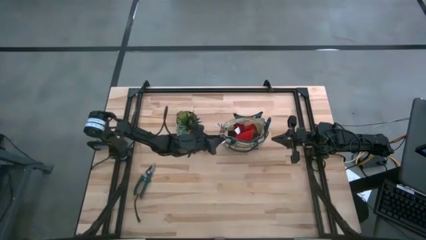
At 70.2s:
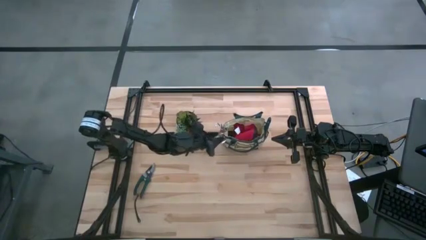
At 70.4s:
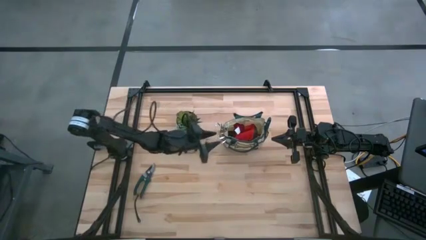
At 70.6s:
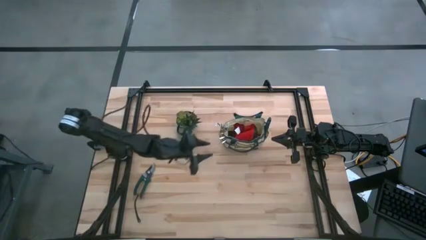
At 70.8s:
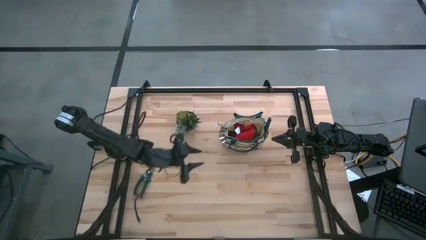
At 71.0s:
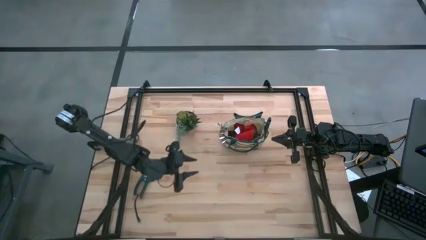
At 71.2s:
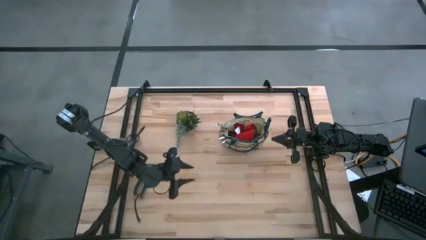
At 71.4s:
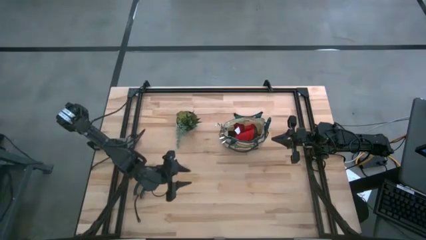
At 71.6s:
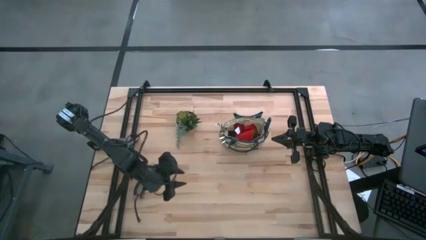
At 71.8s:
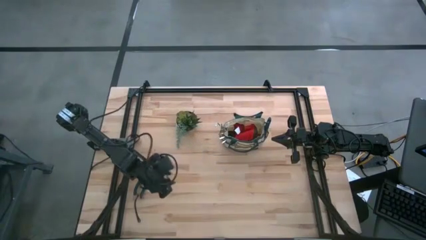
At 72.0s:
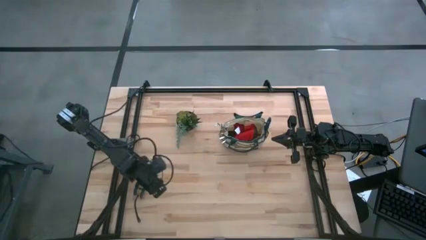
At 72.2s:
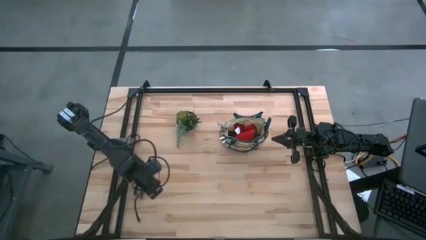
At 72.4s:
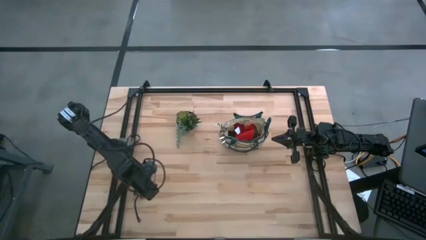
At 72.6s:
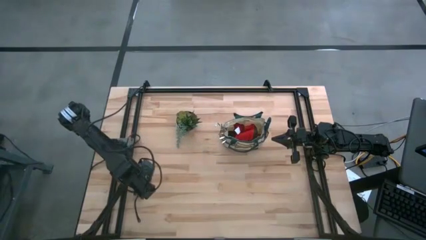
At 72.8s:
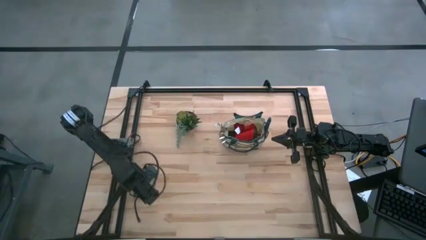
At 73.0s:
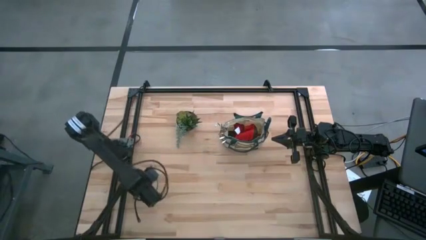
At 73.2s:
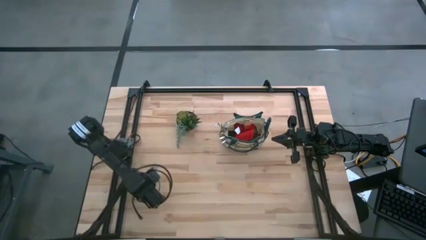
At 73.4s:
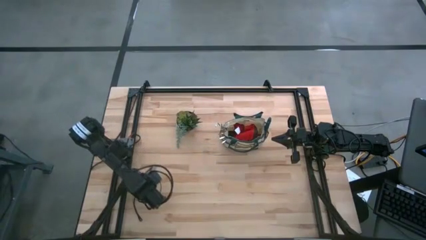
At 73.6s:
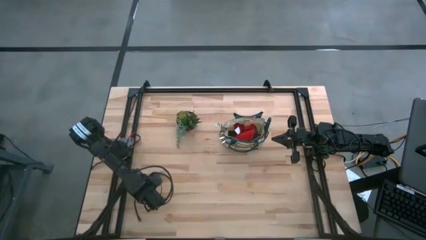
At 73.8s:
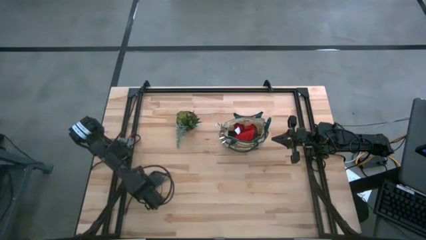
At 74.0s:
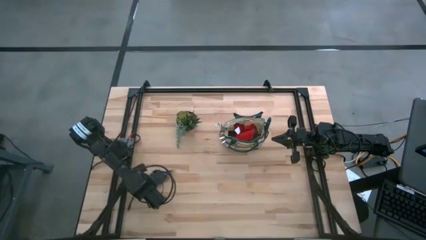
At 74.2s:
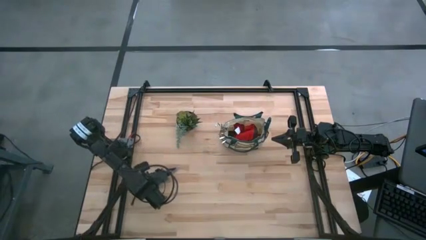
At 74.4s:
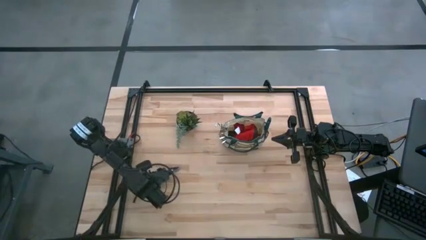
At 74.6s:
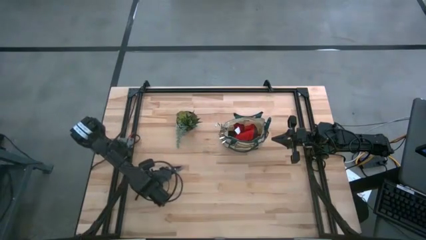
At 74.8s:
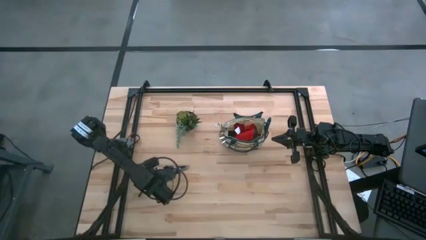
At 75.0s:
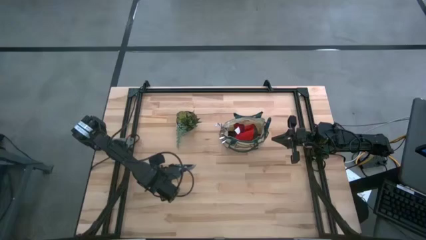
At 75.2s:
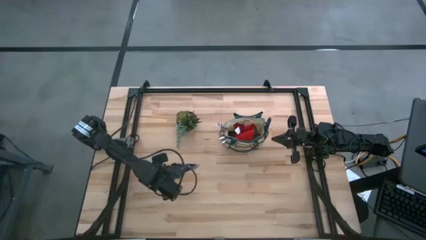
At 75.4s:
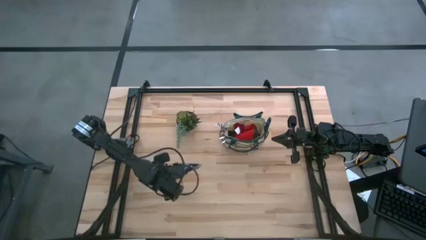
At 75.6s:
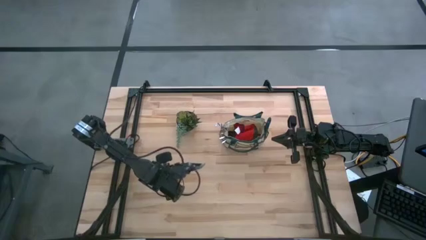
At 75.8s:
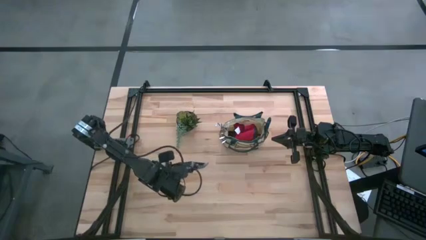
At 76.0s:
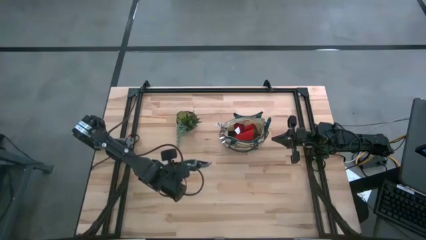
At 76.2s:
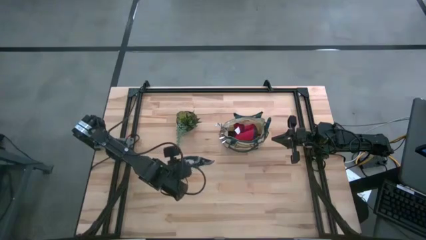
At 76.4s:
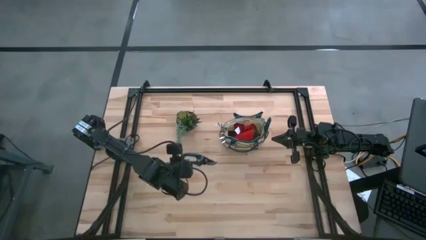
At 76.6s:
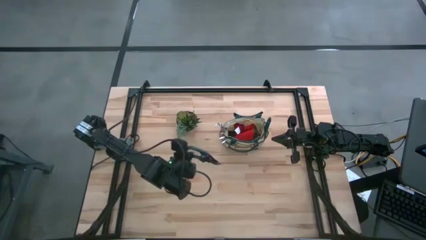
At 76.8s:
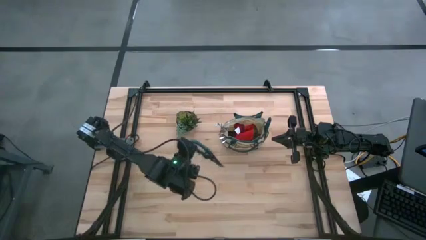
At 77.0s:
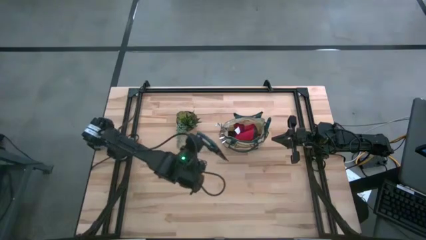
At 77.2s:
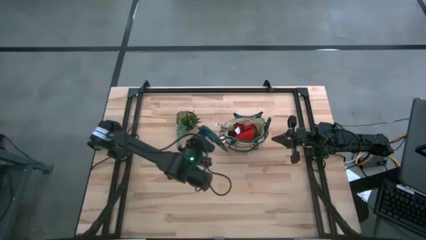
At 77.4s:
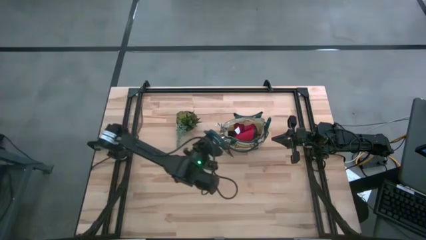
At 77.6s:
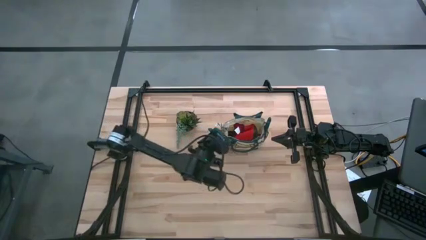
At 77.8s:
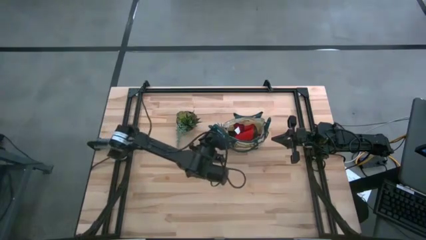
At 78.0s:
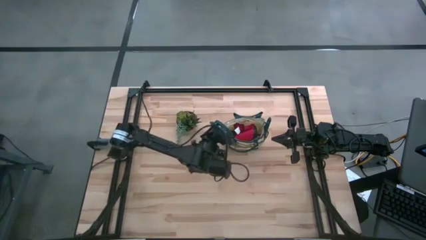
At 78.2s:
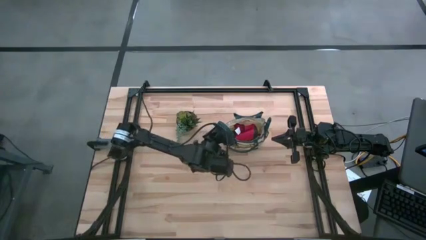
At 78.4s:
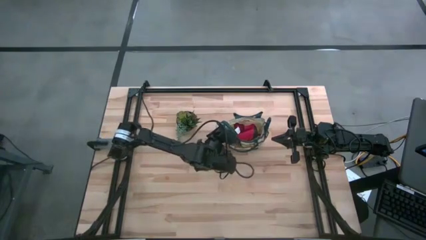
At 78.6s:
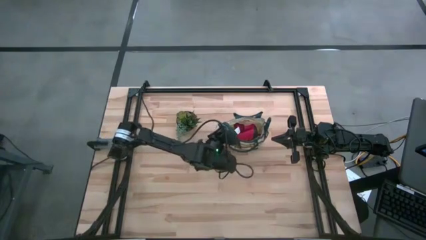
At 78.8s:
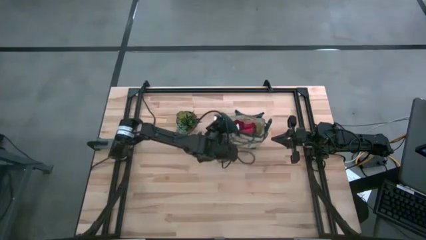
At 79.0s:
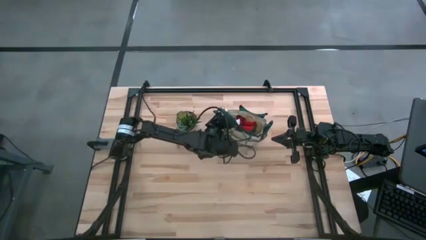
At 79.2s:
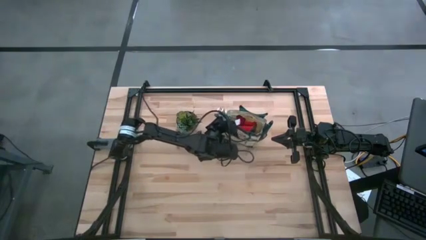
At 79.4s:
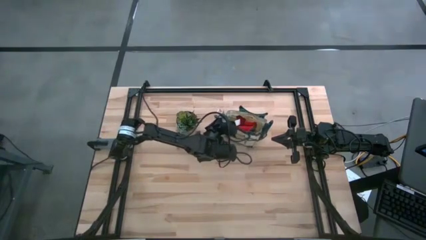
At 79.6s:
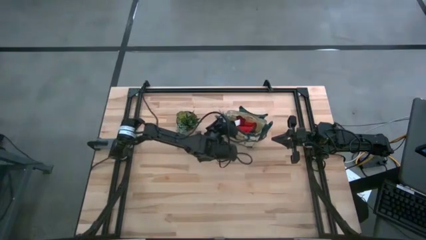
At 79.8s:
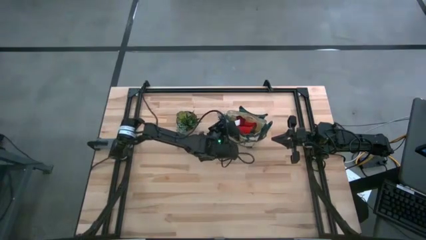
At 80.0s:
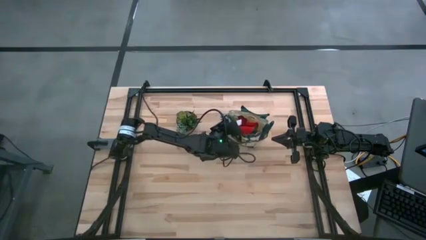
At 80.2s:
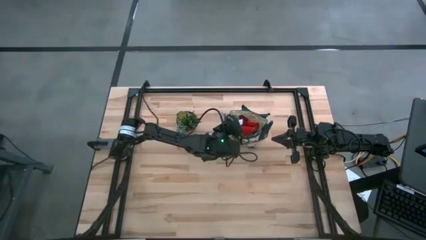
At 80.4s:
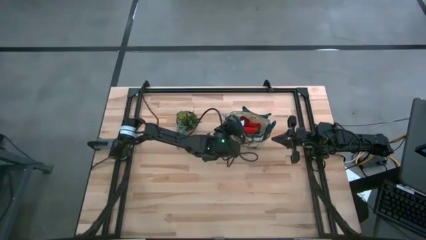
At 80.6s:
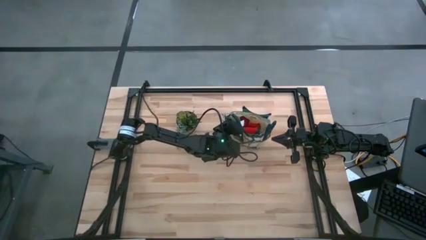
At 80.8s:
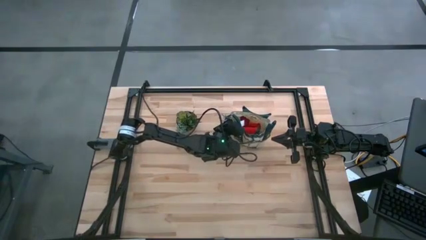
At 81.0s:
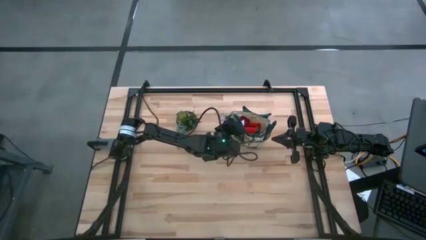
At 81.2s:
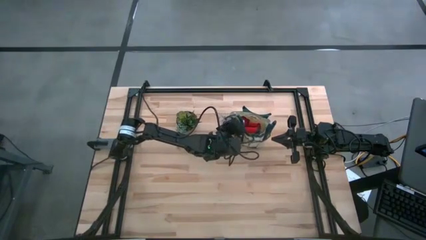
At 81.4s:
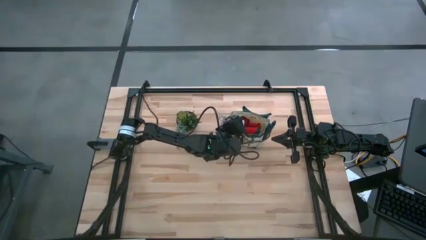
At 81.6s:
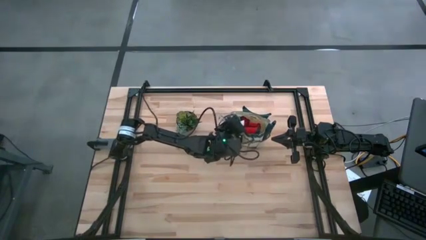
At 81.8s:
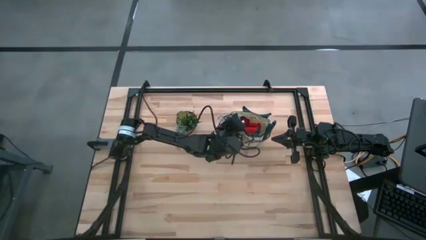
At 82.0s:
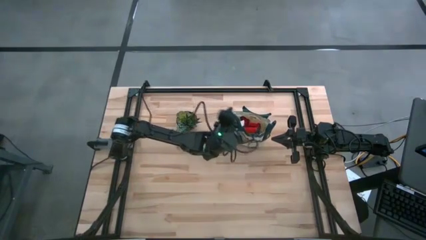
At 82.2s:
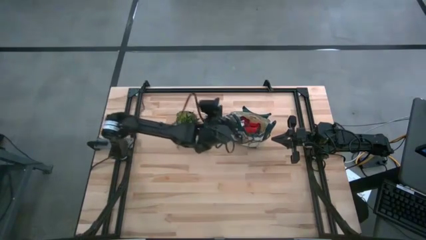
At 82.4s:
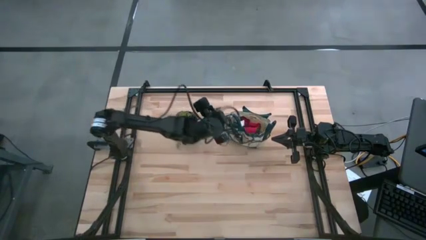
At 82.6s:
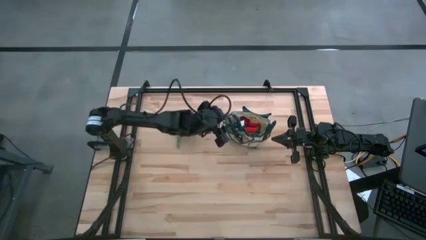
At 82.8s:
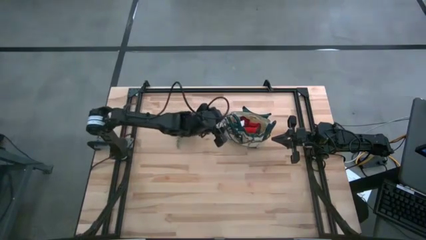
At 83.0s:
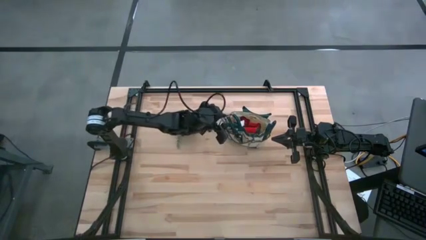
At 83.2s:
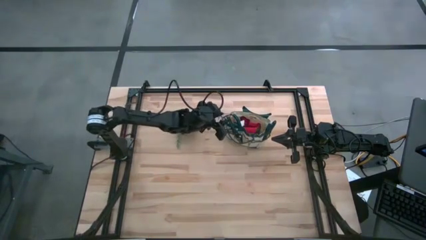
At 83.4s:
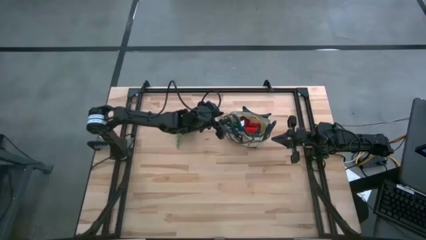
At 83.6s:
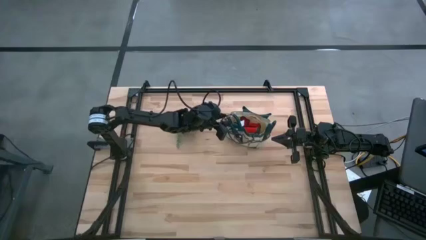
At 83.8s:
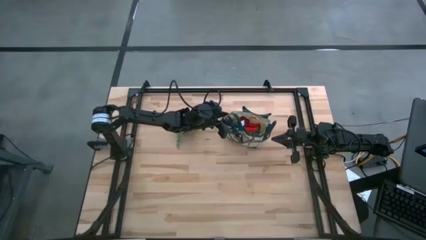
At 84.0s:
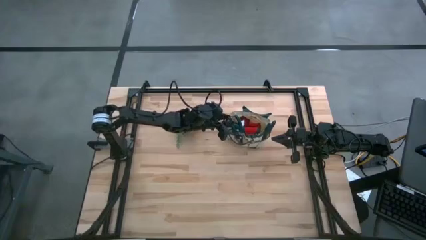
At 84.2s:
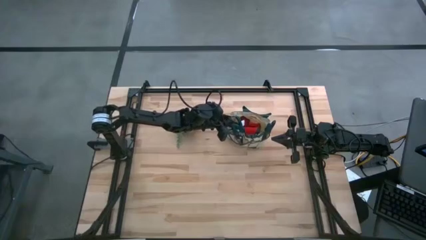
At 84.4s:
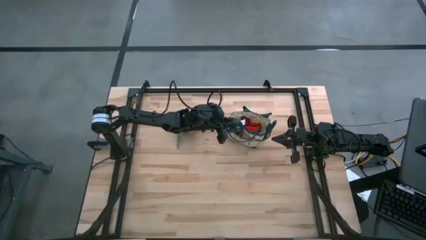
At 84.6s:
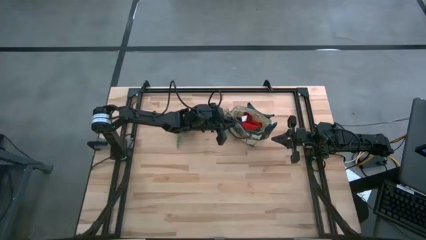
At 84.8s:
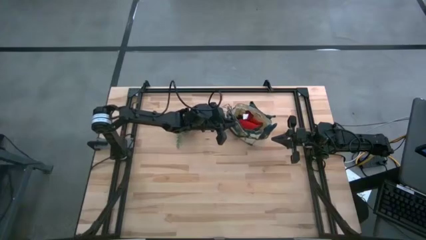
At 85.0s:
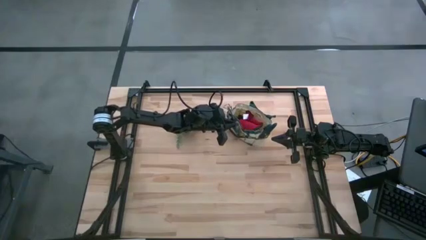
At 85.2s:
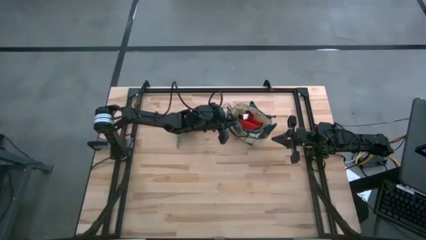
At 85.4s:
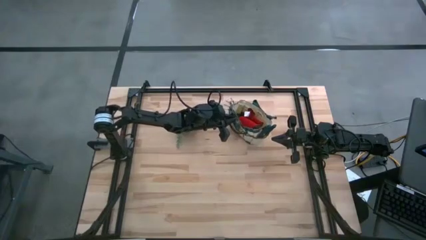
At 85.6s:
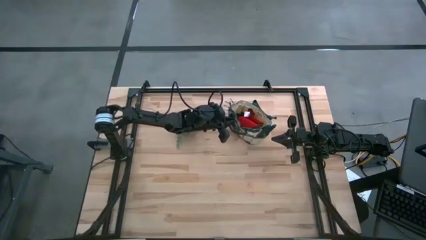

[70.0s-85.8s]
Task: Pick & Place Garden tools in Gardening bag
Put the green shear scissors into the gardening bag

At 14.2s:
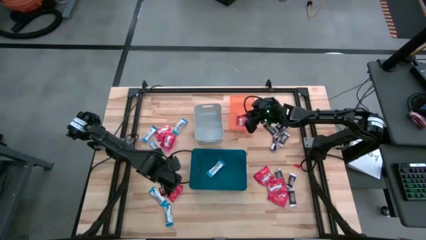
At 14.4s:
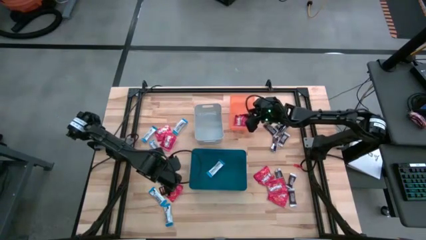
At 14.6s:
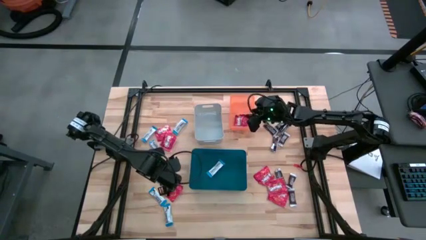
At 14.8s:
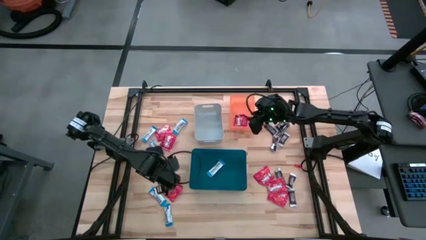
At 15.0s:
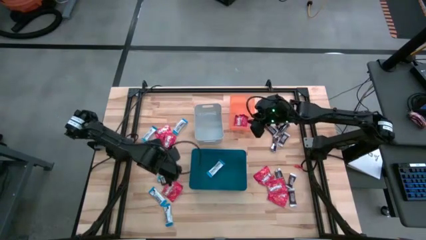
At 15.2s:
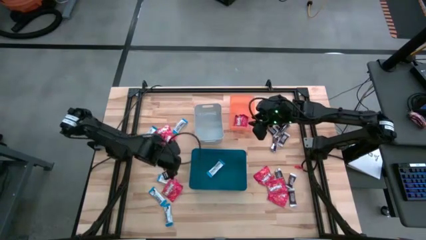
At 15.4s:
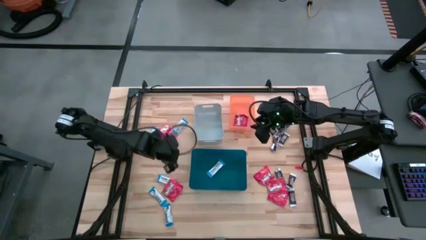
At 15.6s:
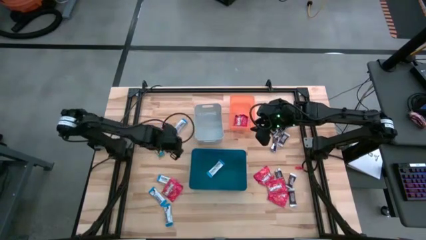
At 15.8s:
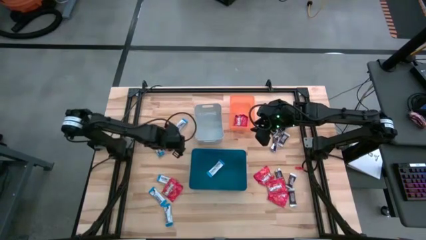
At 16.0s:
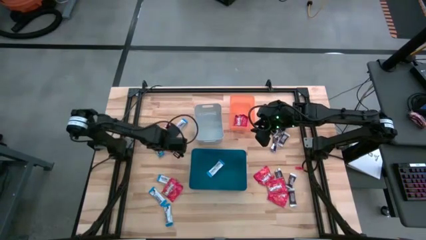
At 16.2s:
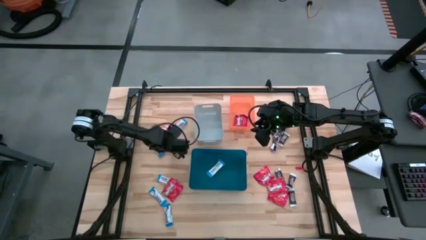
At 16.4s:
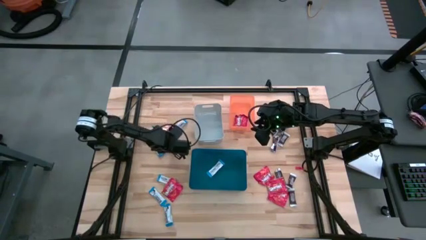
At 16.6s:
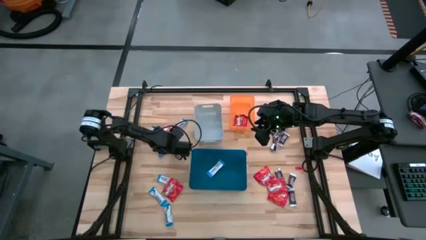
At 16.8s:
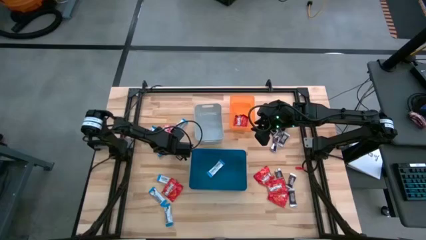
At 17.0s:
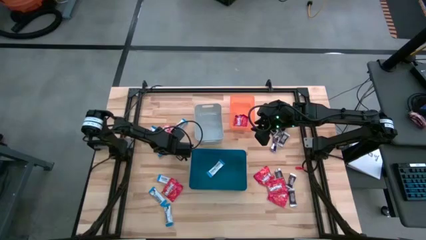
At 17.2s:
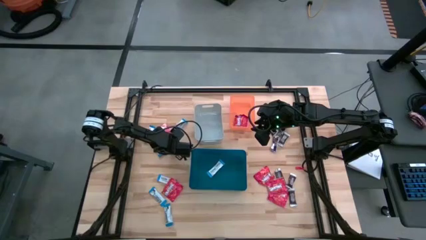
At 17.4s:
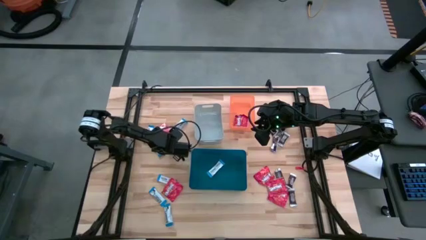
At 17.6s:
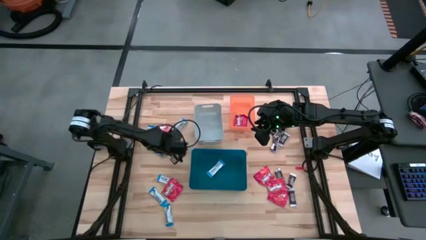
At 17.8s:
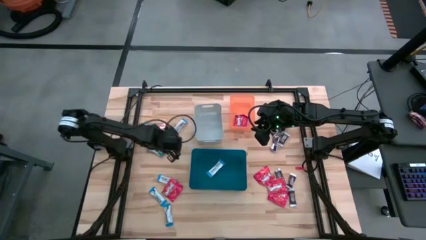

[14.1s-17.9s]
Task: Sort candy
Put the red chocolate into the orange bin
